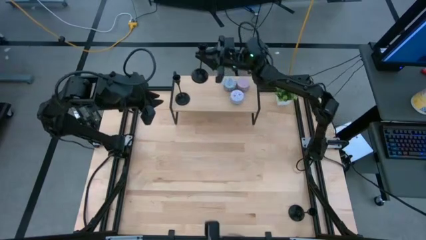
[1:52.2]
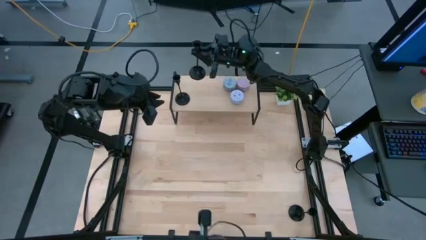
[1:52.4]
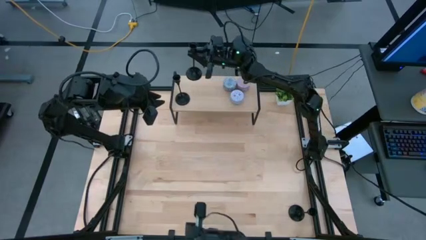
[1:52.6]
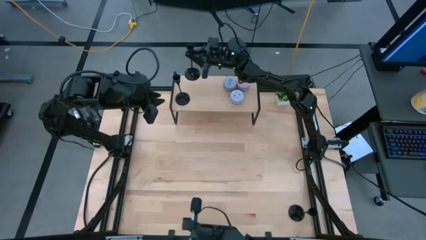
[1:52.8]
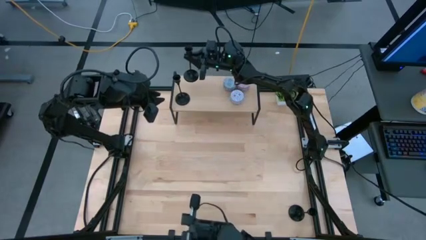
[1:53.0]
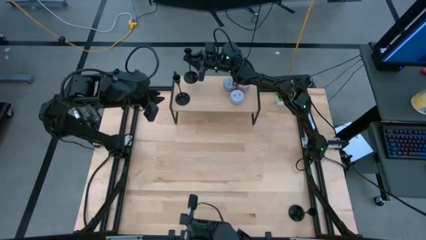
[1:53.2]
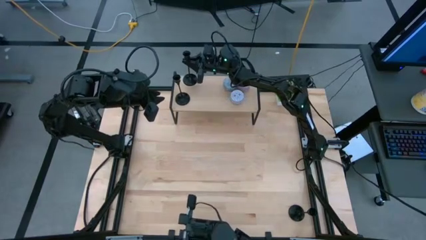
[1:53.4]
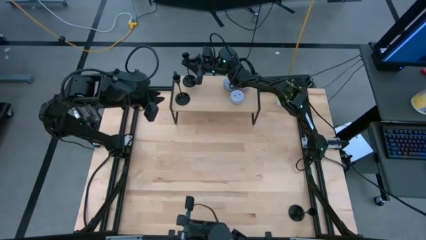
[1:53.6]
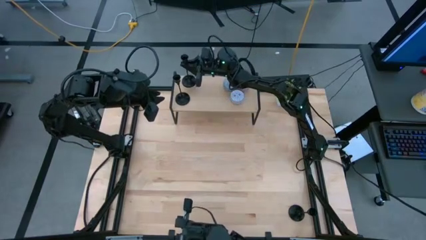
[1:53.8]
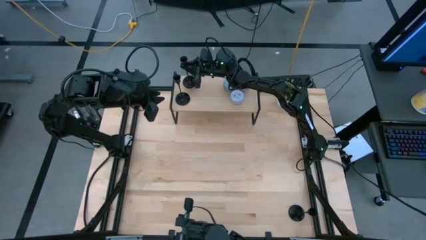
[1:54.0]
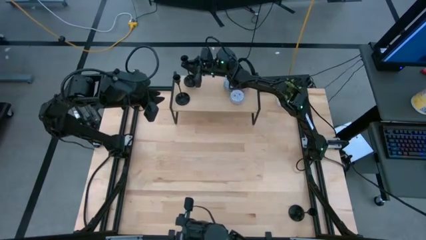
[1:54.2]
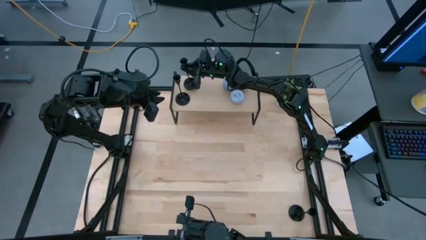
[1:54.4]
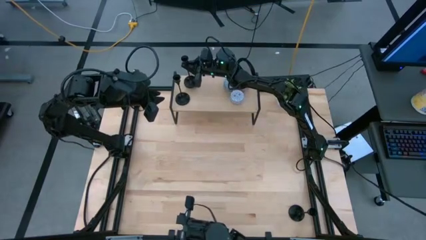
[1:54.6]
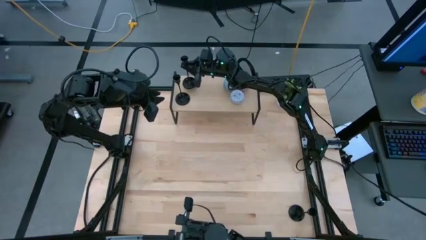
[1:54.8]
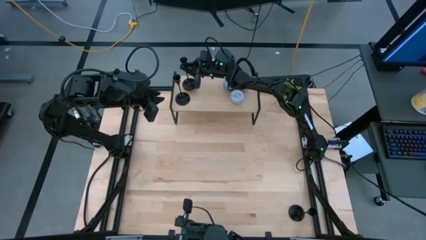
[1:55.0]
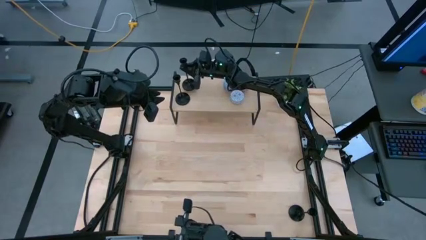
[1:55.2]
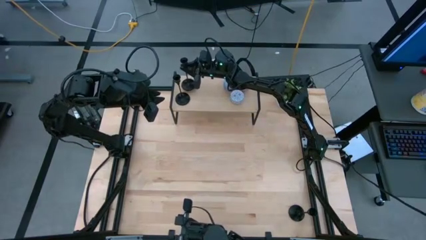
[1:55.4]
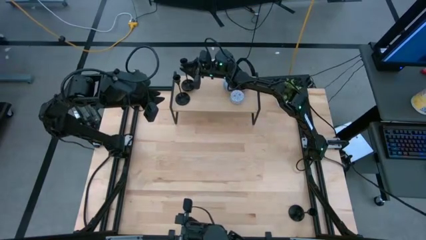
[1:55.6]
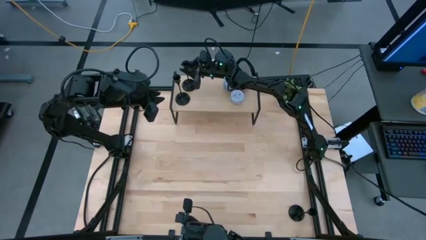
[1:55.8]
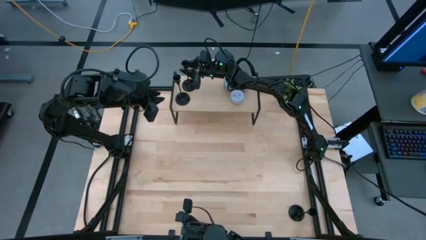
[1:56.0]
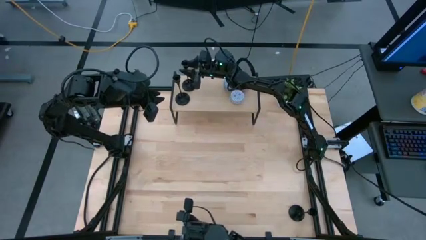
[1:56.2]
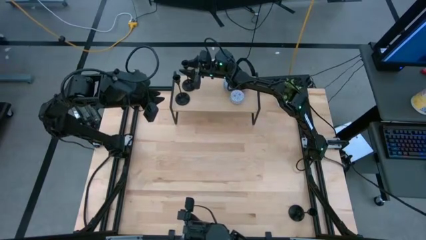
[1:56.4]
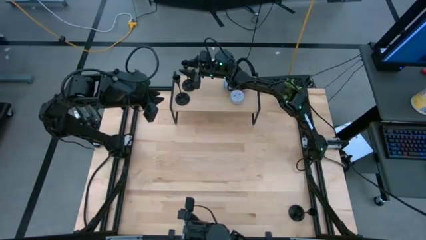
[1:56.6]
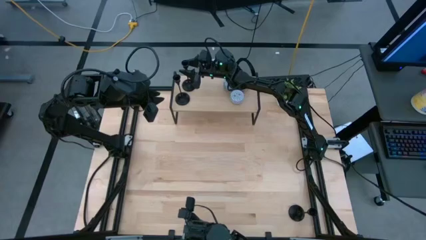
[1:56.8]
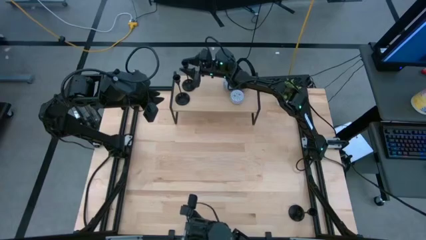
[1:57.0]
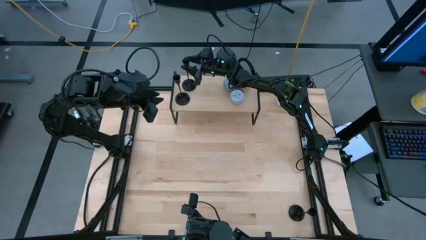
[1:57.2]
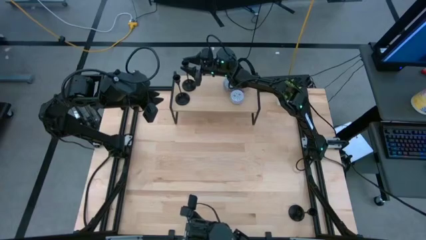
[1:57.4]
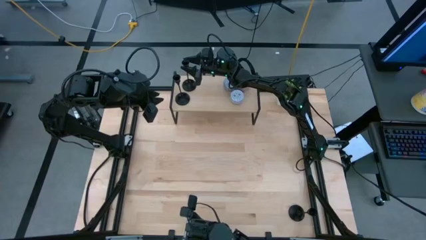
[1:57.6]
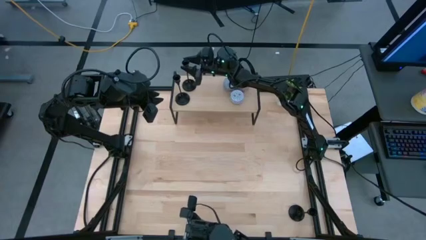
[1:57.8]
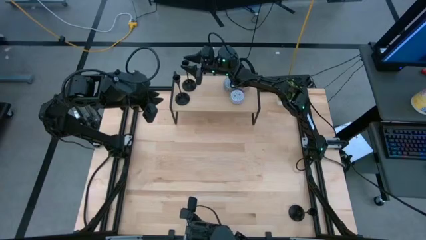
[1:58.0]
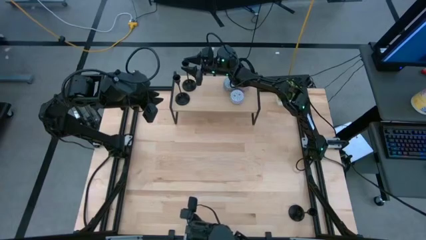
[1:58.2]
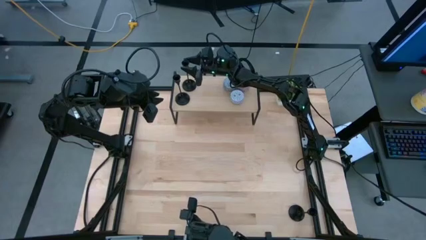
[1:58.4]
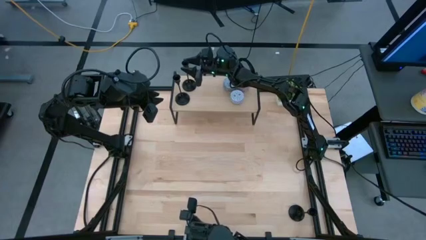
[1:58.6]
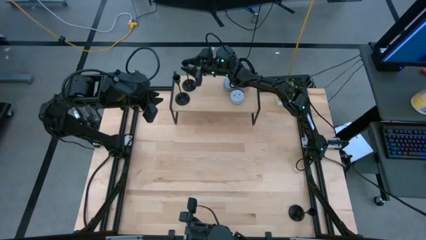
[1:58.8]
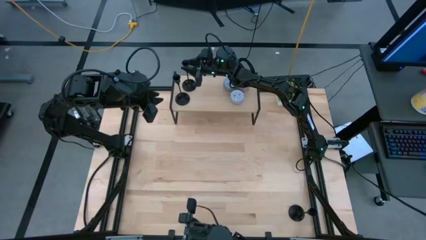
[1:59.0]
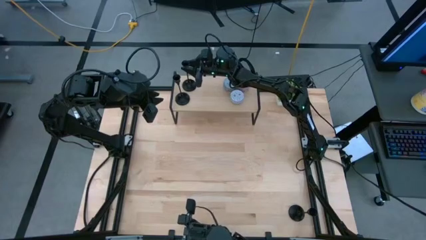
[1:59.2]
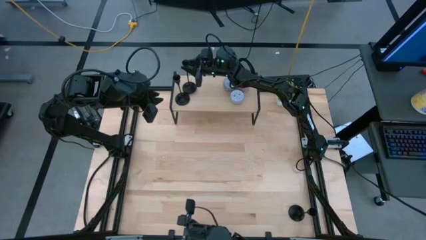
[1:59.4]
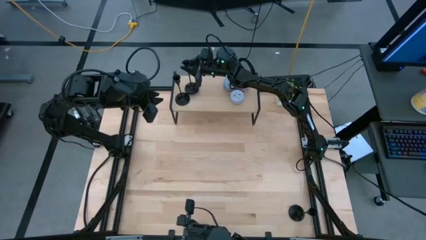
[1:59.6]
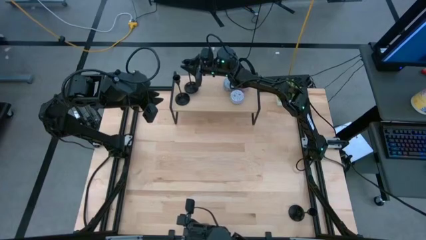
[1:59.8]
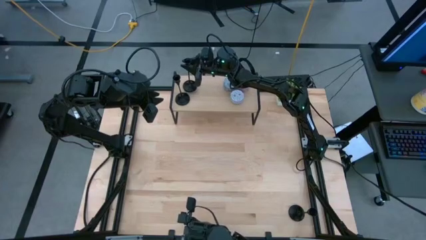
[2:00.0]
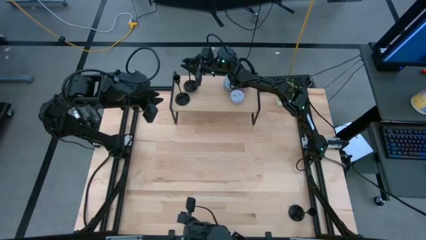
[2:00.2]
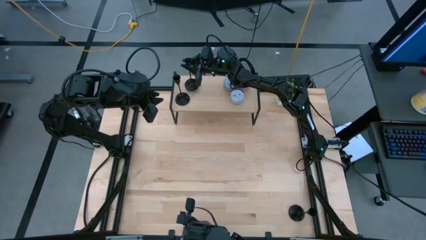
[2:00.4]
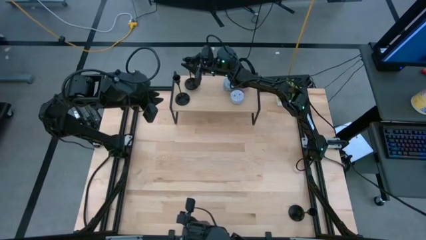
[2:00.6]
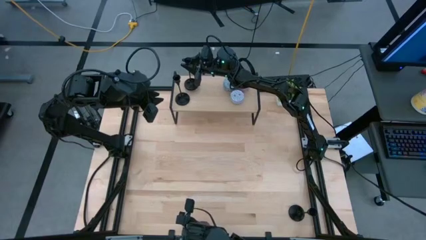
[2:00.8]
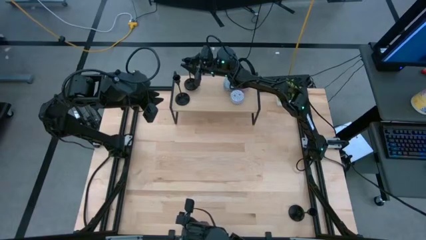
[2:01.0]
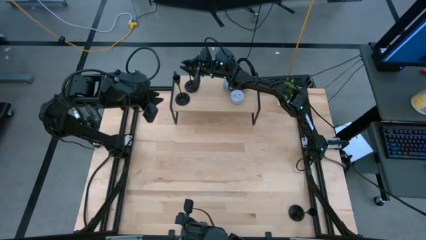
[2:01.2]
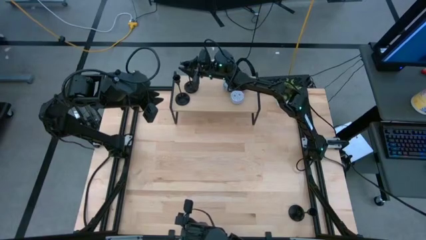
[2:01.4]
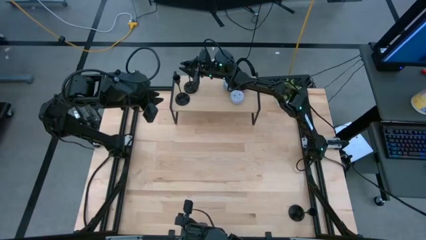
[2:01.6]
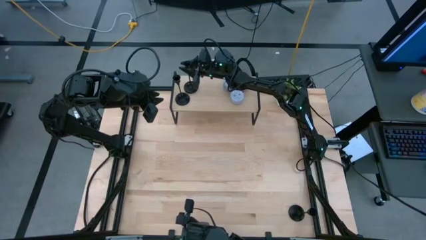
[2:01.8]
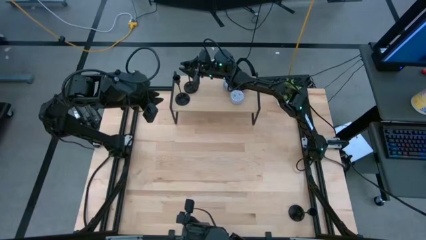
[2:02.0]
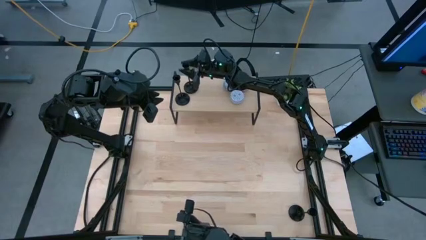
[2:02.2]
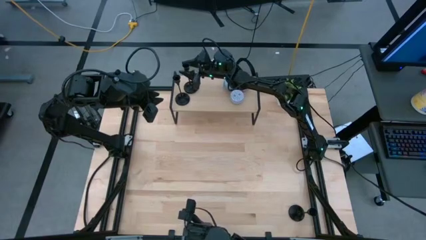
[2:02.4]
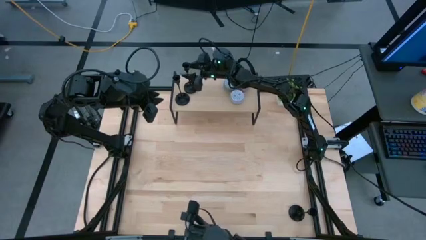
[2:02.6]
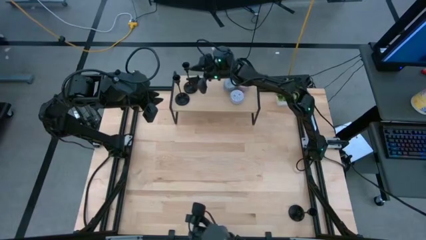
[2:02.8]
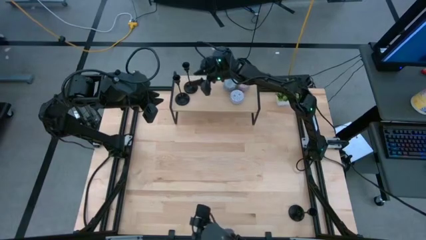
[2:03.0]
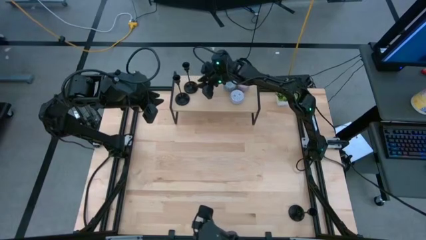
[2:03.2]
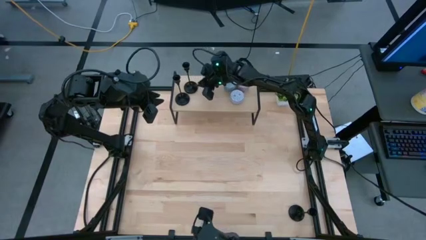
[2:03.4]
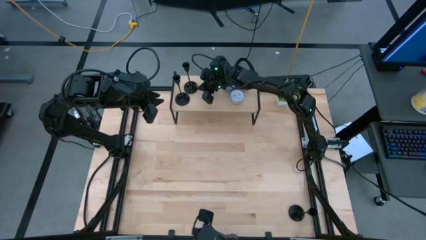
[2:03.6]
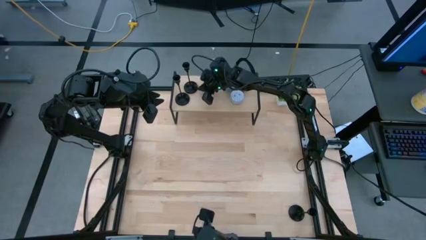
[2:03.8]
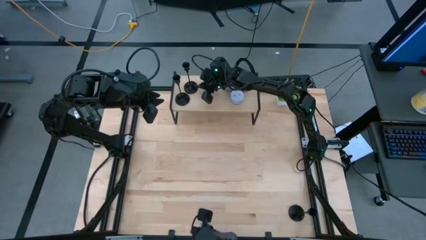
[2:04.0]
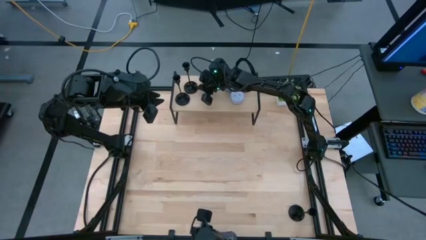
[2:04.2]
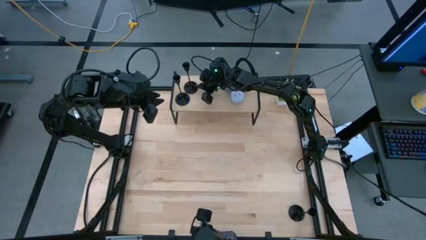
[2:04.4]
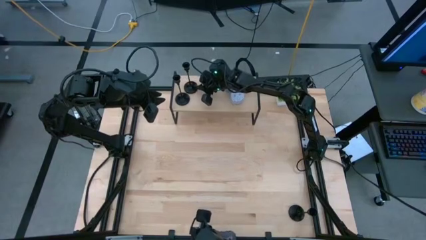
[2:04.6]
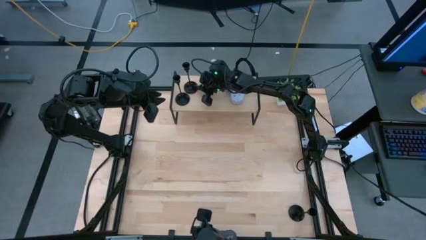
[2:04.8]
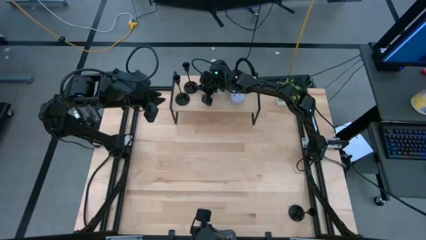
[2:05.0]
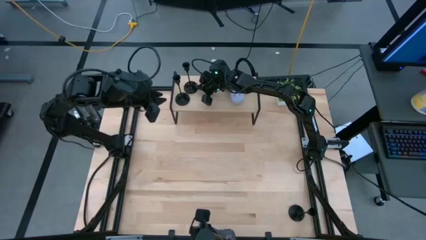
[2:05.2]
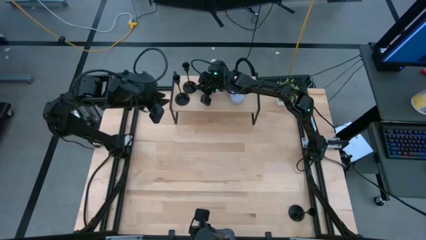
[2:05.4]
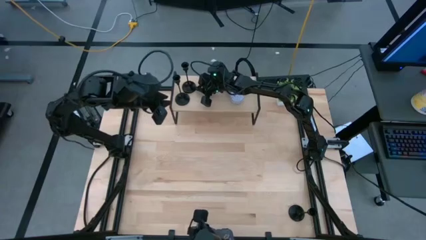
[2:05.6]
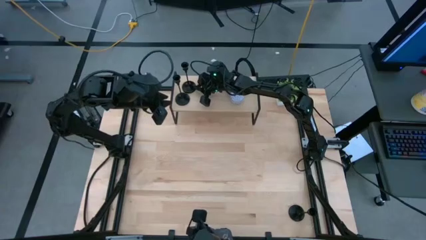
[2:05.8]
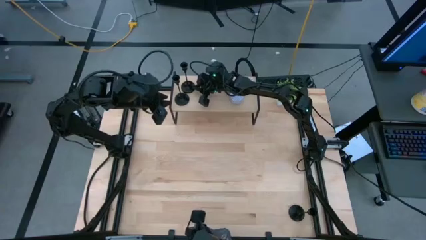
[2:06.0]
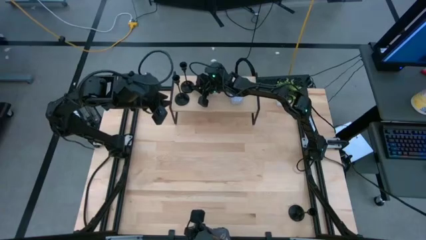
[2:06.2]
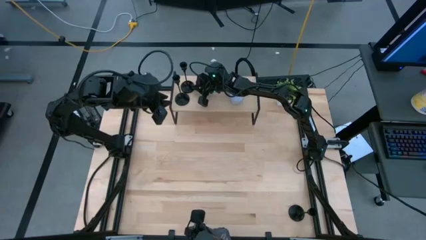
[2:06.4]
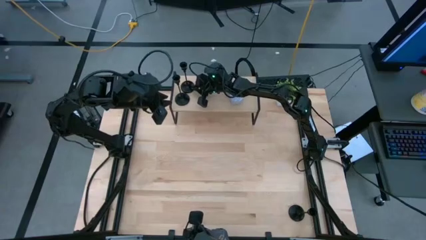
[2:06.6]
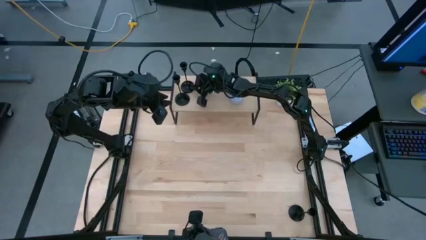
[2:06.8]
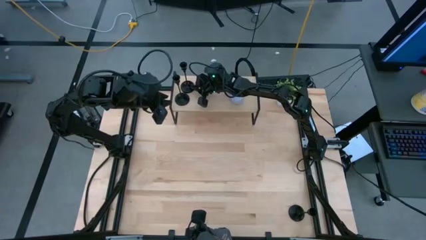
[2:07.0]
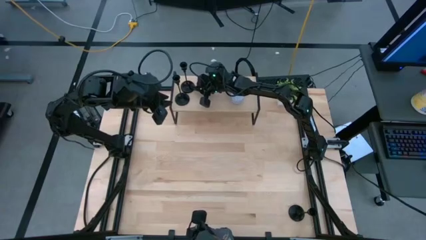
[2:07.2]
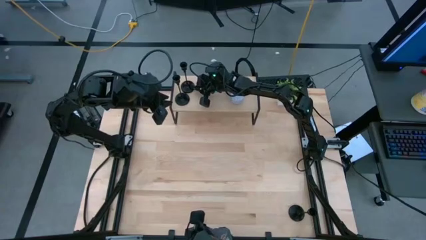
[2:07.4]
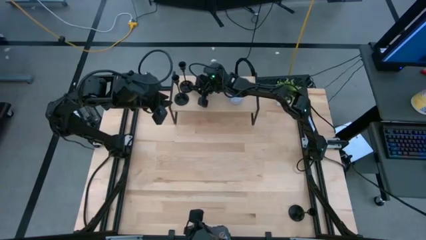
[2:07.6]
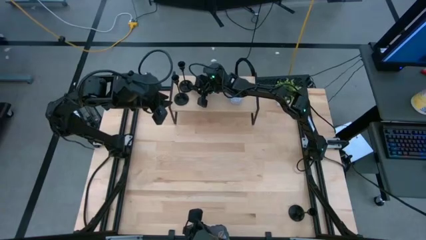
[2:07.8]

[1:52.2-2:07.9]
Task: Pick & Place candle stick holders
Put the top black candle holder on the shelf
